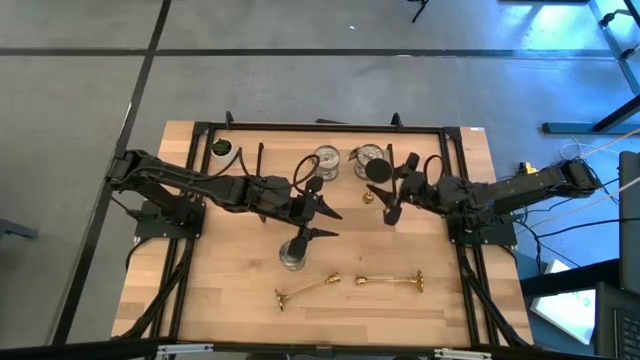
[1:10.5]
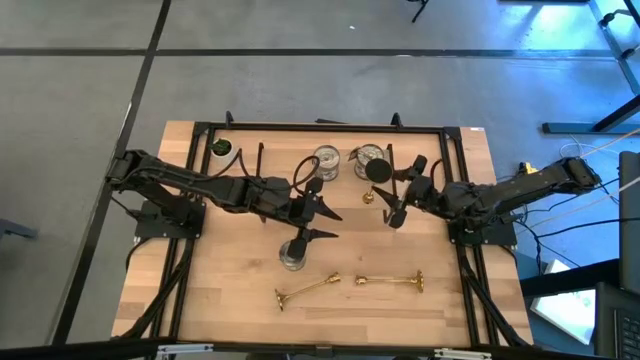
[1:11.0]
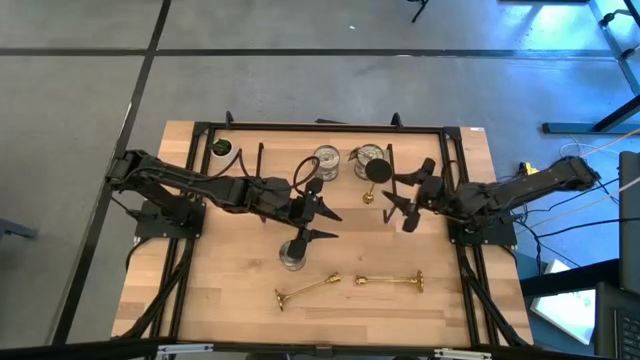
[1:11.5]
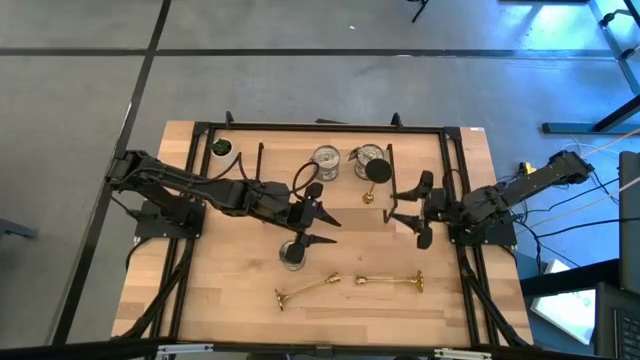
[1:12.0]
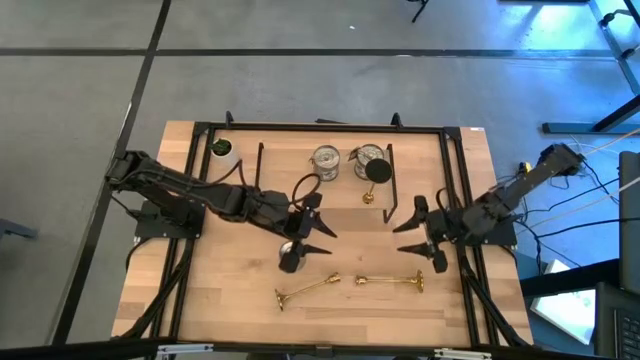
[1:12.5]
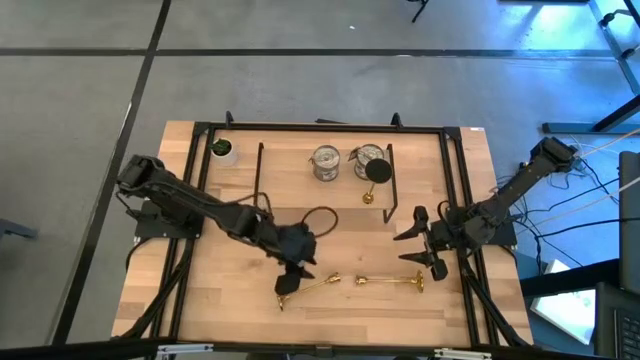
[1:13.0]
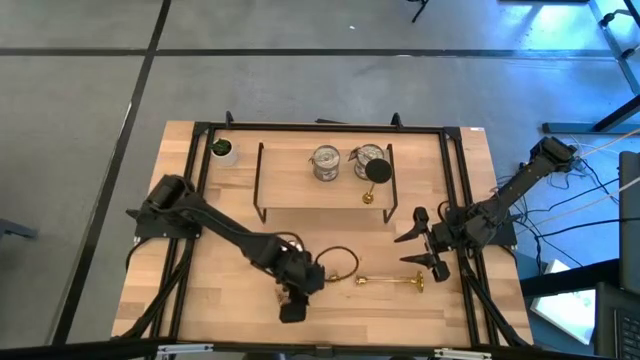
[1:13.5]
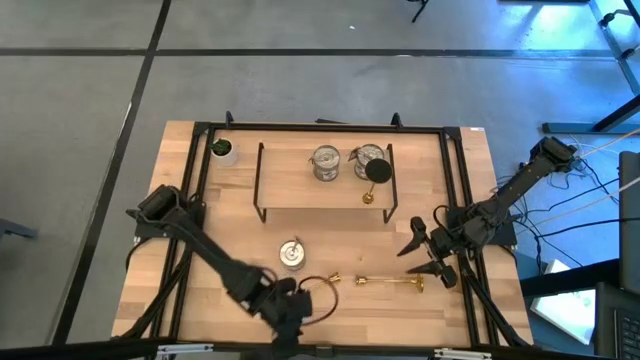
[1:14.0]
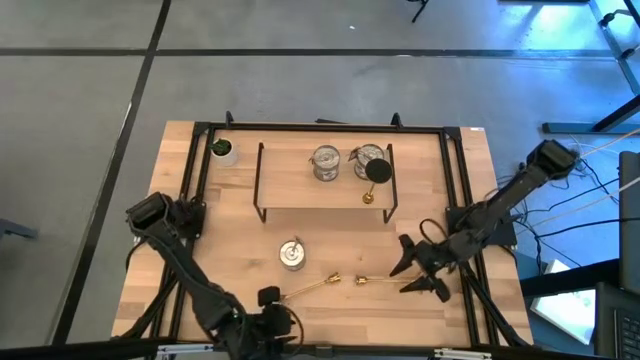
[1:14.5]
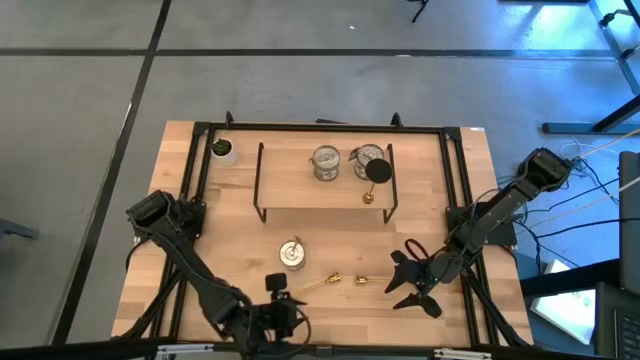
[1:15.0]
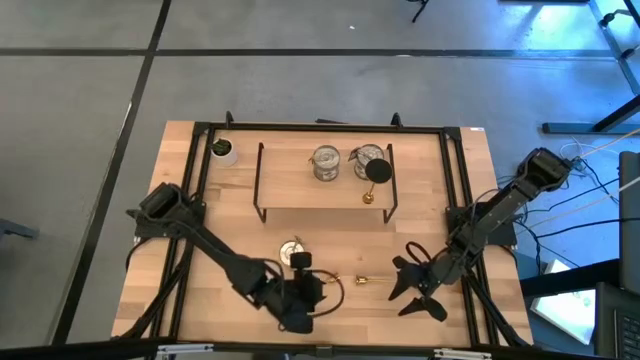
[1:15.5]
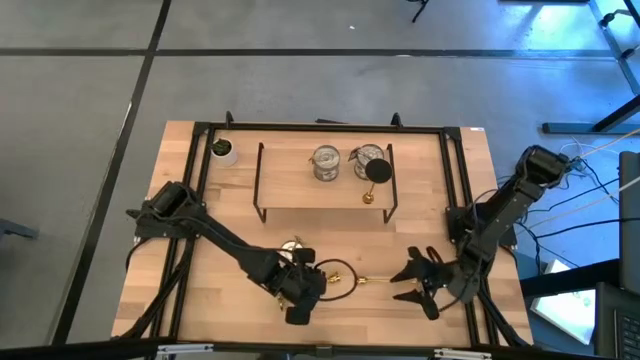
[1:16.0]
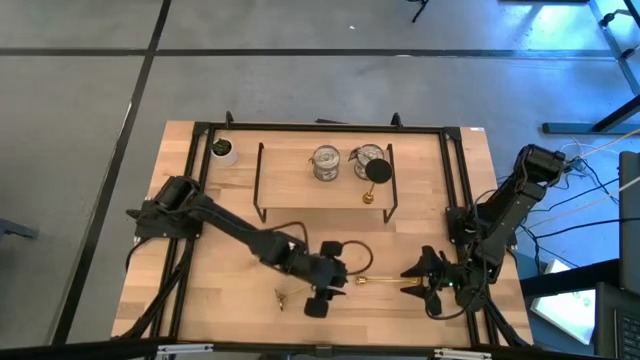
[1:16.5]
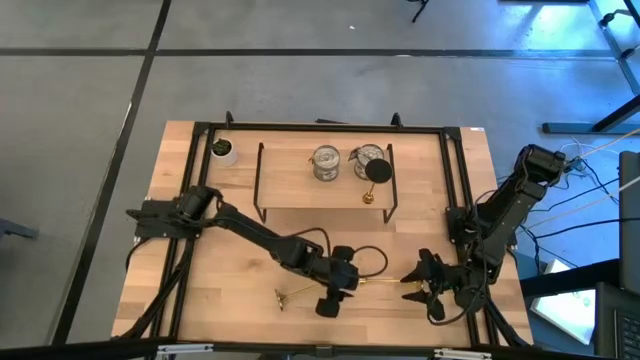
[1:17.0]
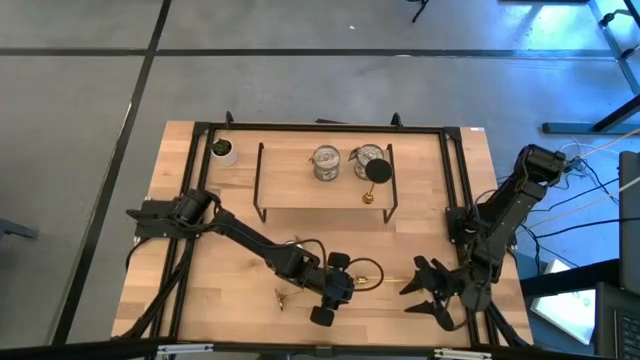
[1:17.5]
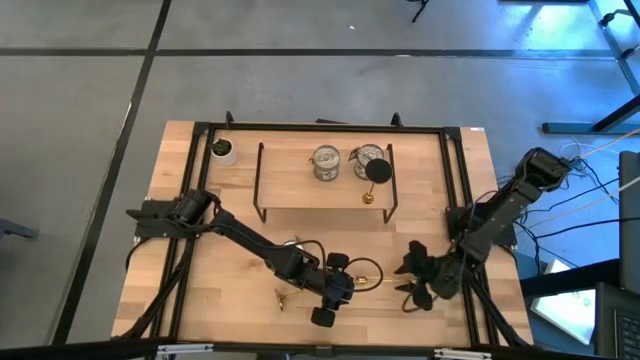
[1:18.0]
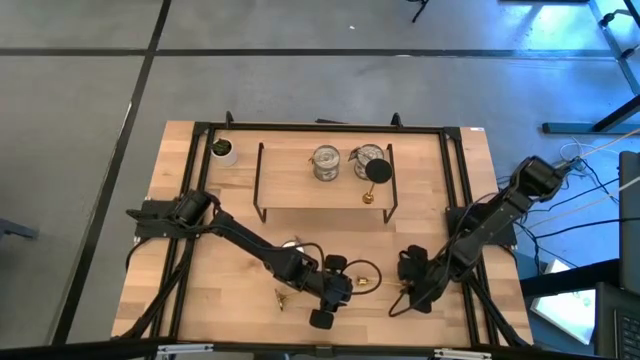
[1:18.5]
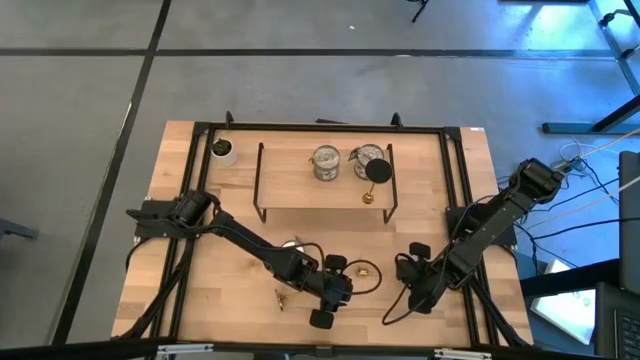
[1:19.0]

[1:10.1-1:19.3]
Task: Pick & Place candle stick holders
Put the right gold candle holder on the shelf

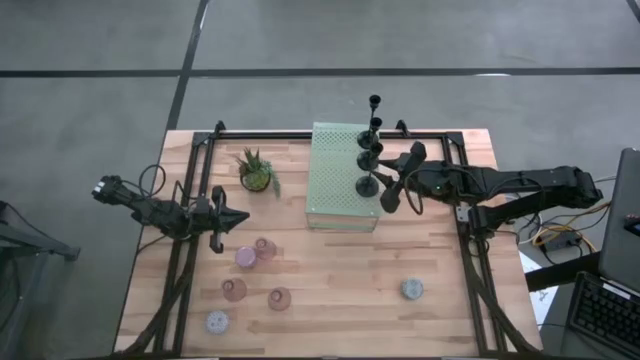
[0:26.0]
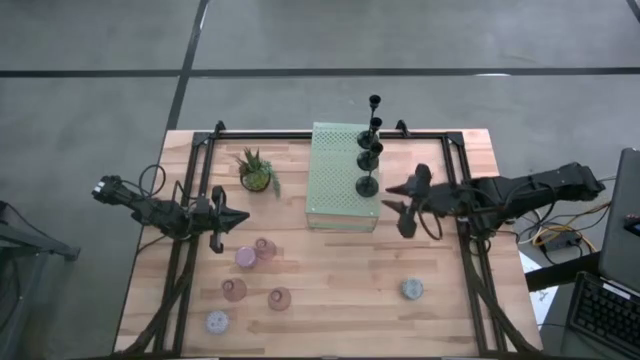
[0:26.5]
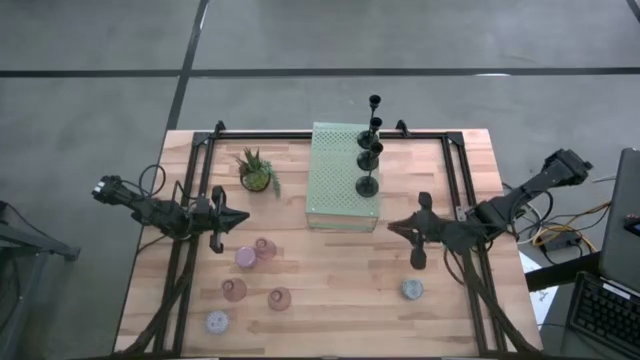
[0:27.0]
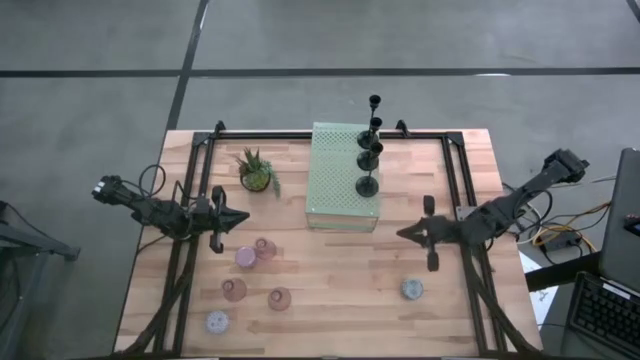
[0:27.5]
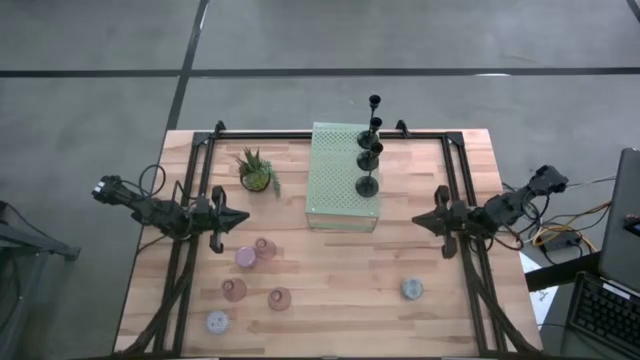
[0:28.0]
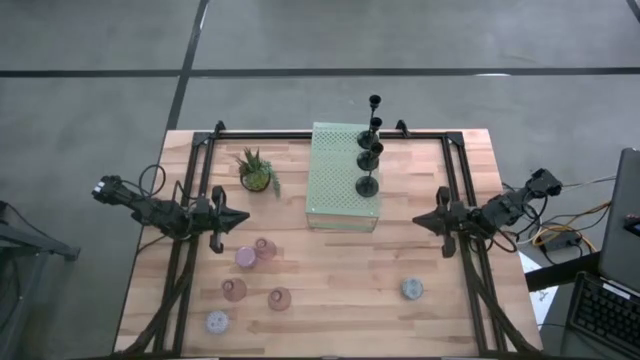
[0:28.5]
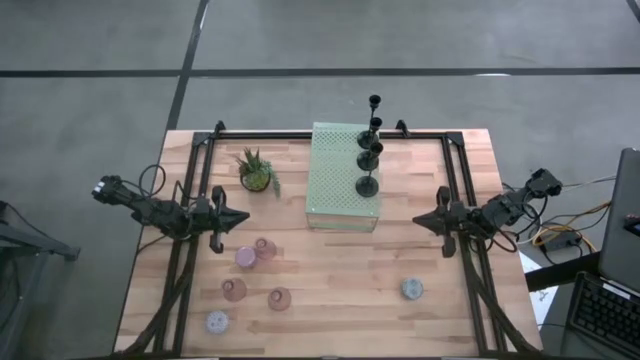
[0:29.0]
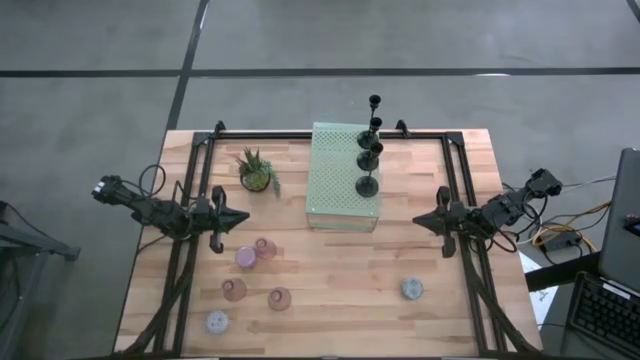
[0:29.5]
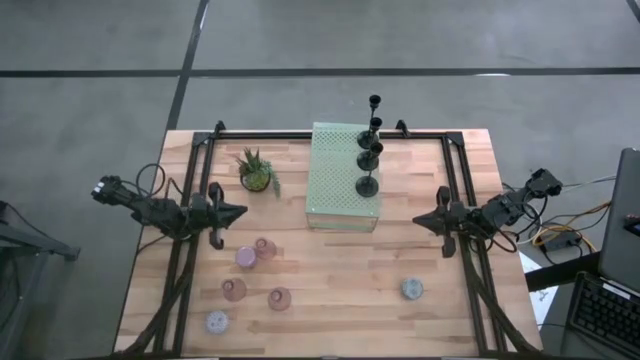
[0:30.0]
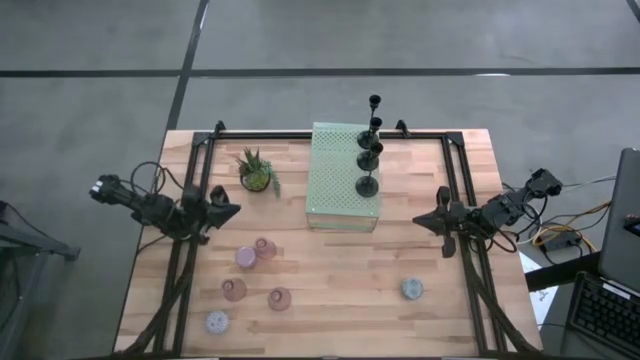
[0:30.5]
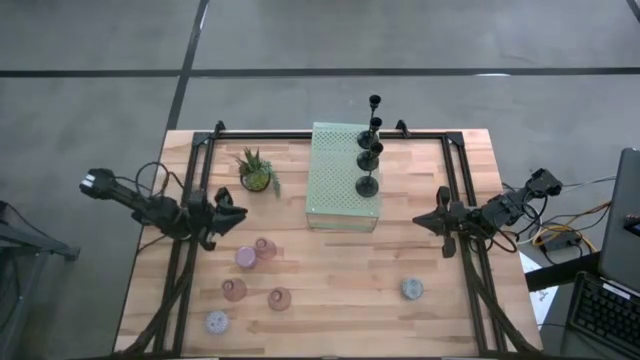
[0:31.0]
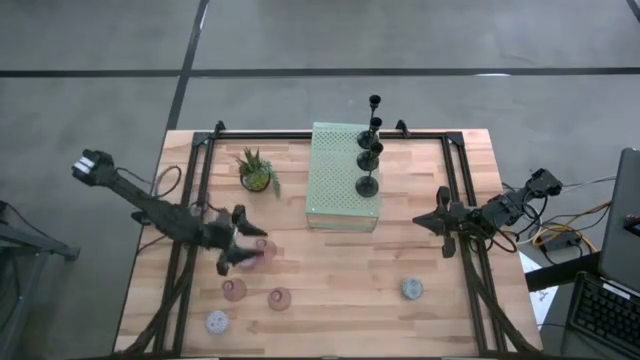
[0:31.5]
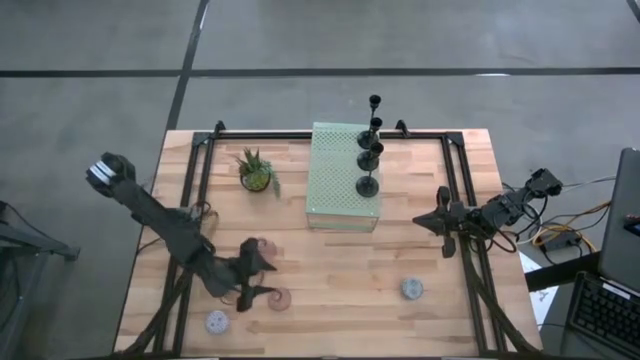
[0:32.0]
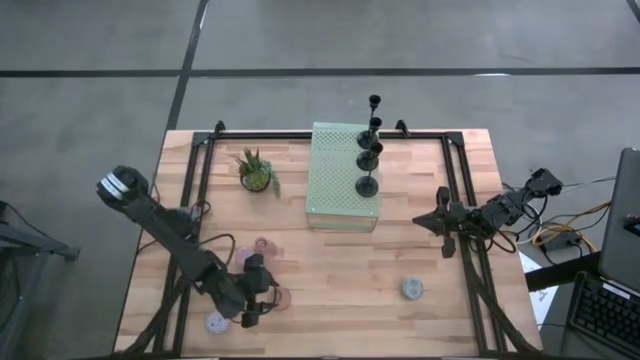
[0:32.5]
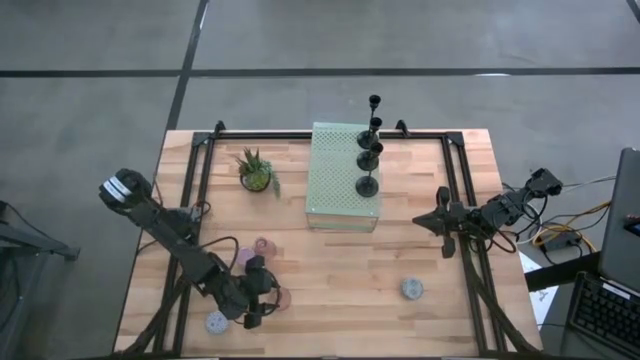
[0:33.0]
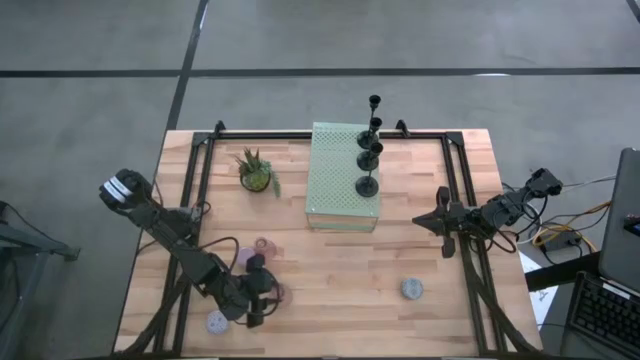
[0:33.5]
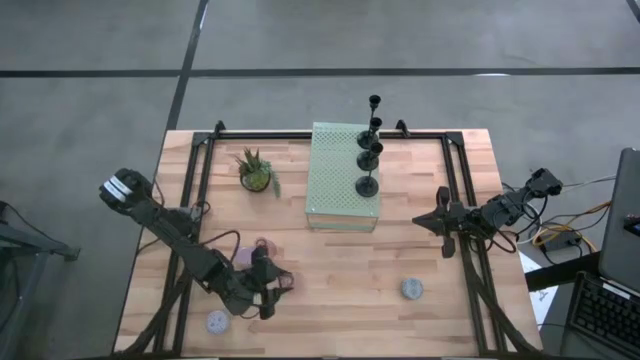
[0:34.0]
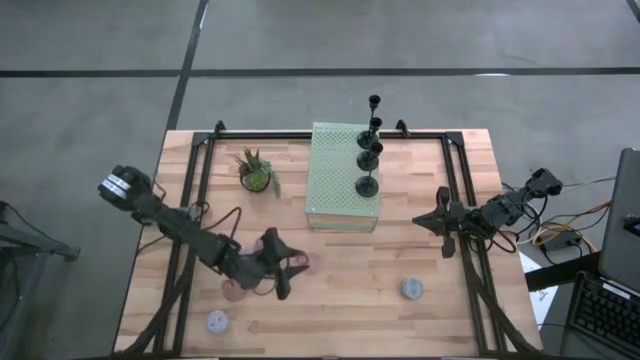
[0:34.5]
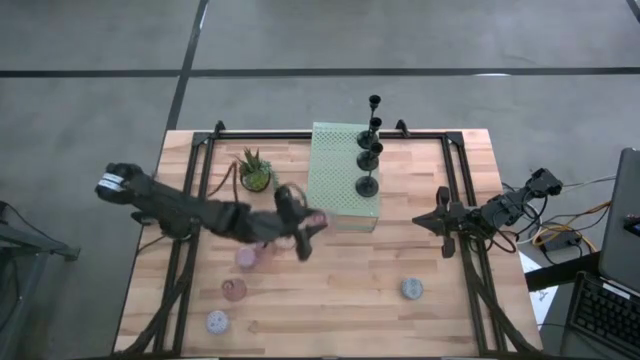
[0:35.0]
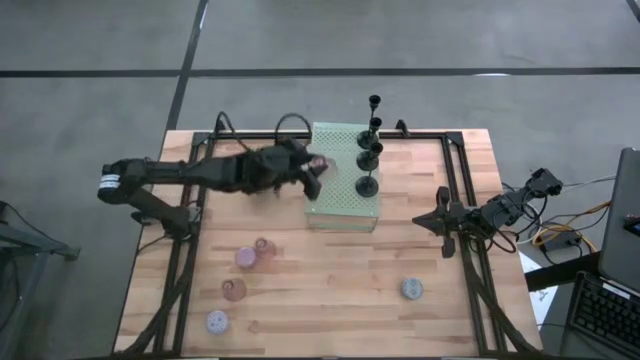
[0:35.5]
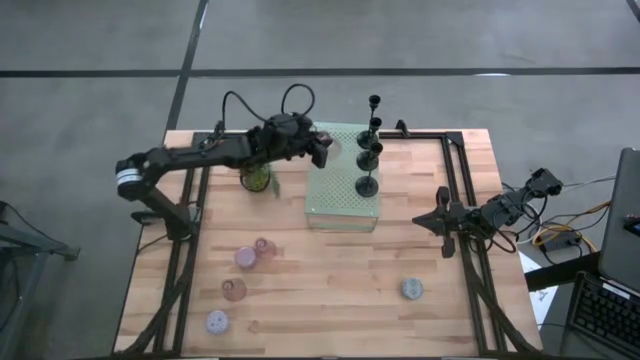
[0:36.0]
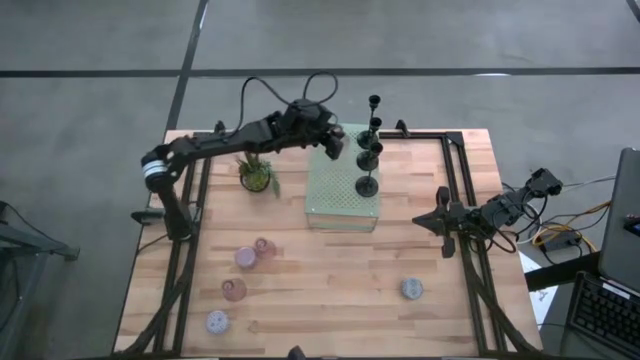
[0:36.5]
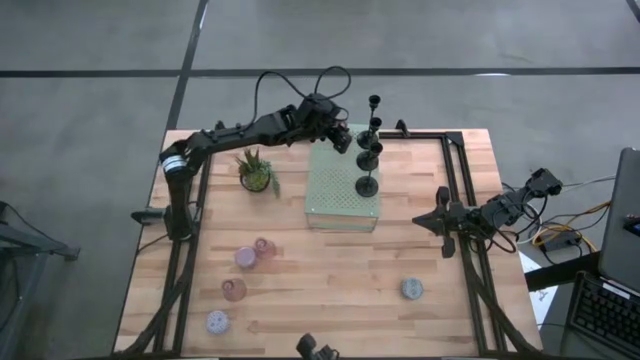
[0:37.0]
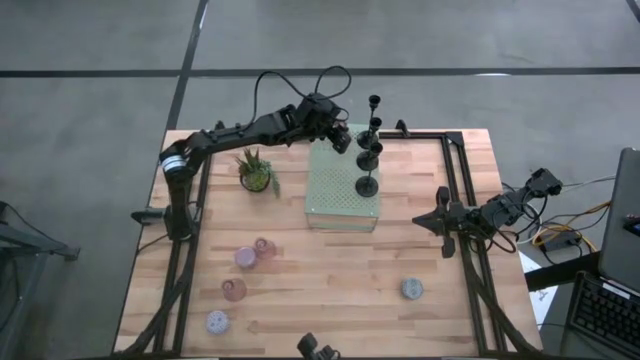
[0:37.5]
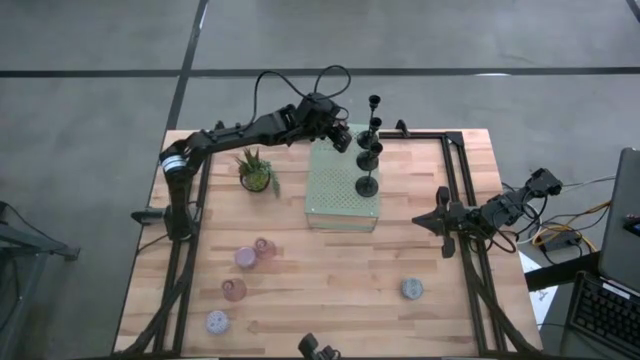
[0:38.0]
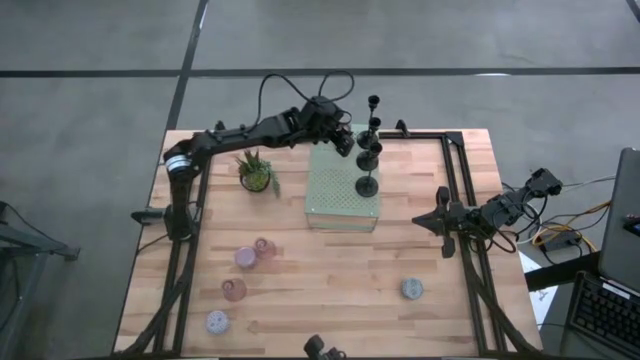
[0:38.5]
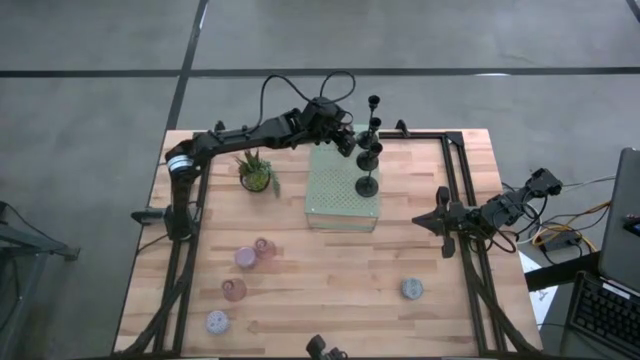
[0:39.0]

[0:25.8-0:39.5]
Task: Pick & Place candle stick holders
Put the bottom right pink candle holder on the shelf
